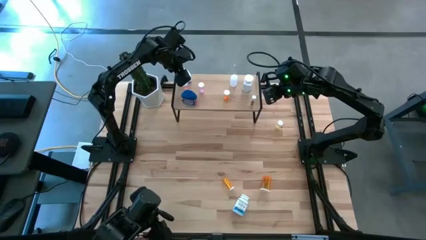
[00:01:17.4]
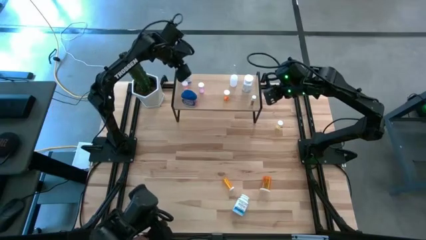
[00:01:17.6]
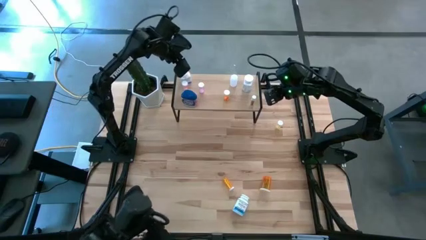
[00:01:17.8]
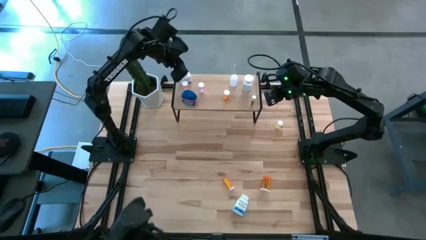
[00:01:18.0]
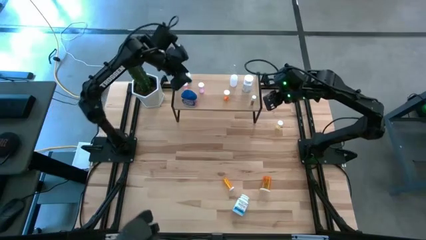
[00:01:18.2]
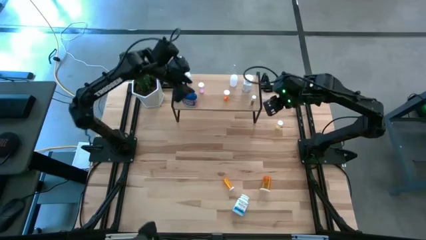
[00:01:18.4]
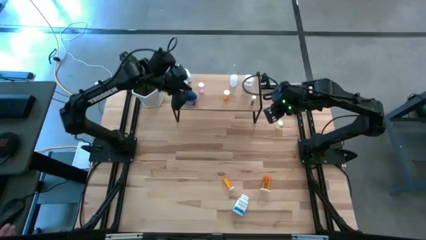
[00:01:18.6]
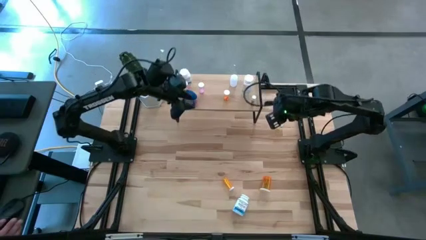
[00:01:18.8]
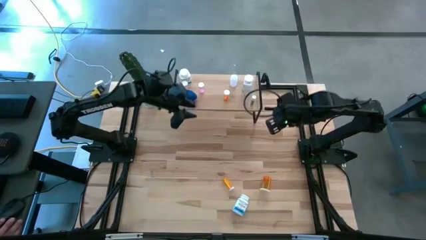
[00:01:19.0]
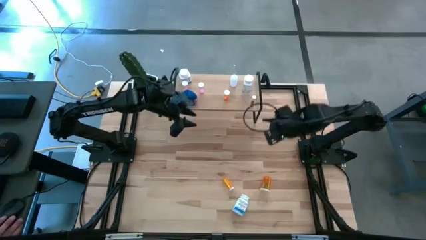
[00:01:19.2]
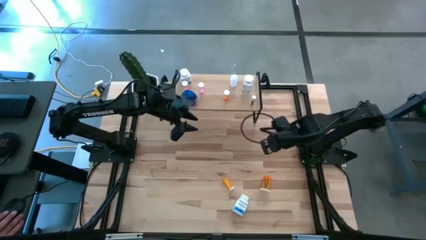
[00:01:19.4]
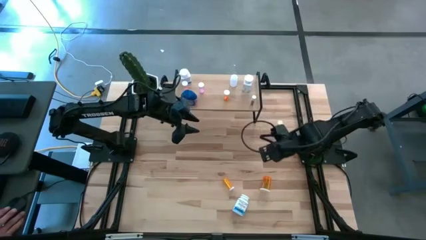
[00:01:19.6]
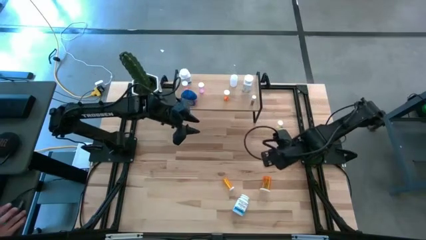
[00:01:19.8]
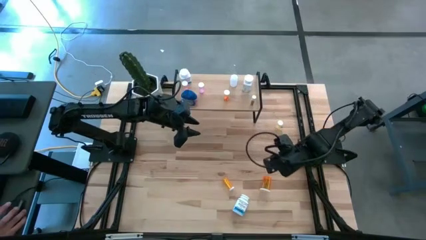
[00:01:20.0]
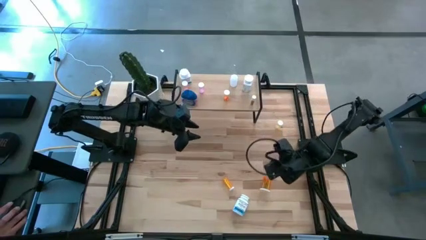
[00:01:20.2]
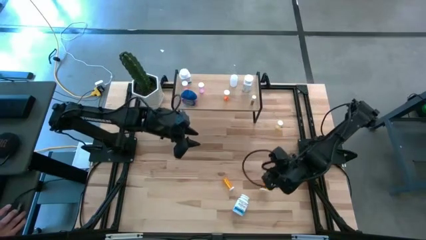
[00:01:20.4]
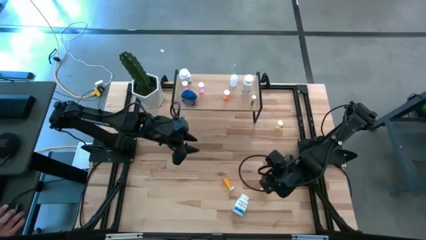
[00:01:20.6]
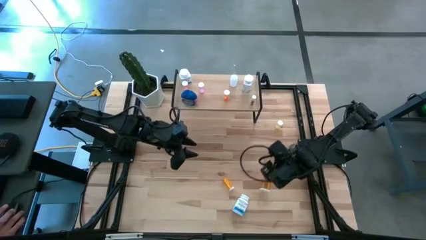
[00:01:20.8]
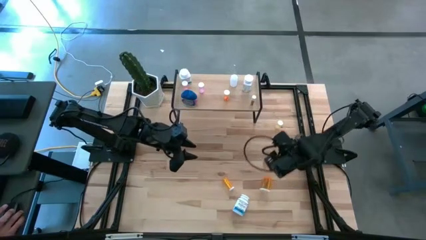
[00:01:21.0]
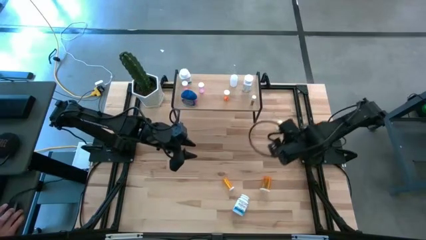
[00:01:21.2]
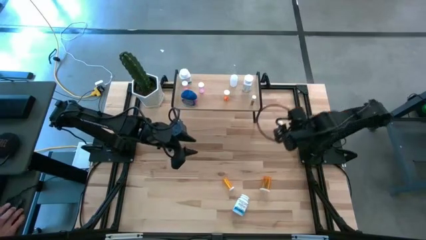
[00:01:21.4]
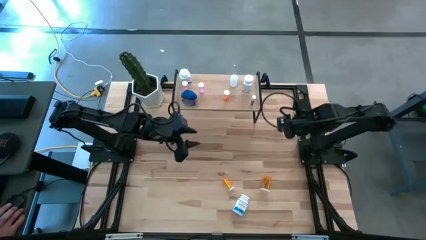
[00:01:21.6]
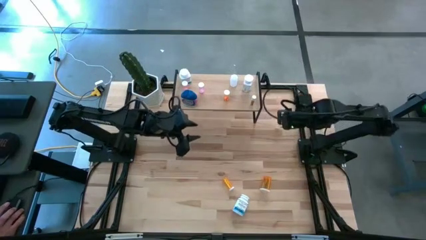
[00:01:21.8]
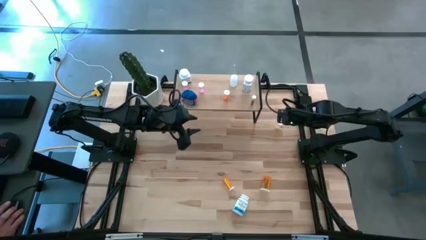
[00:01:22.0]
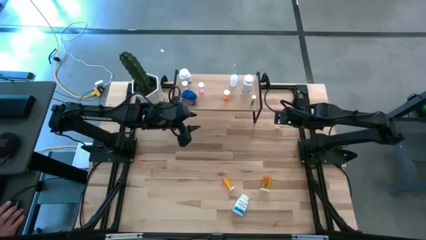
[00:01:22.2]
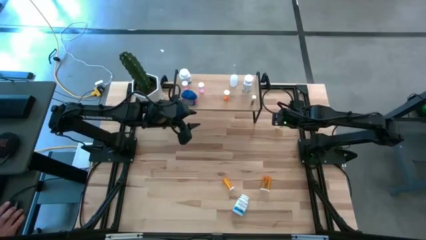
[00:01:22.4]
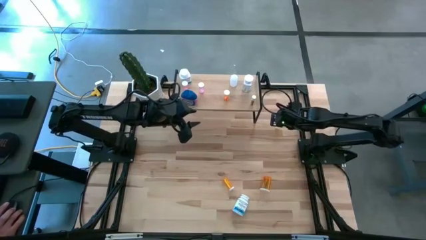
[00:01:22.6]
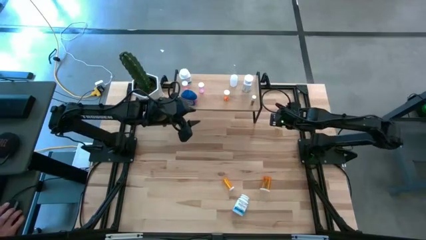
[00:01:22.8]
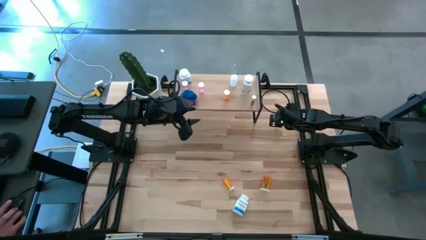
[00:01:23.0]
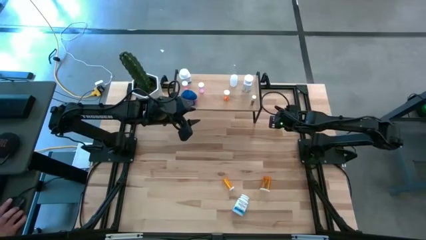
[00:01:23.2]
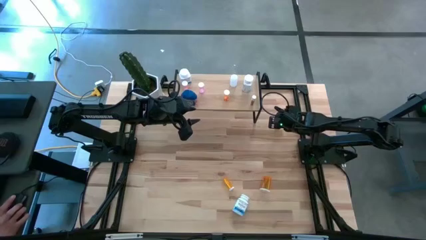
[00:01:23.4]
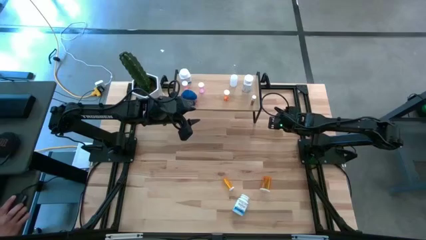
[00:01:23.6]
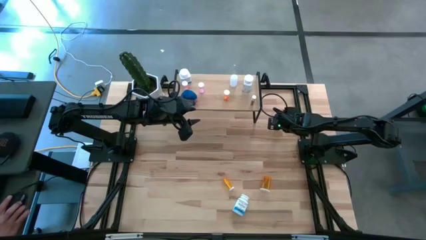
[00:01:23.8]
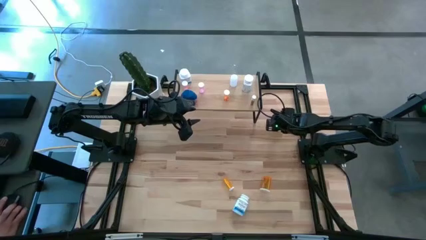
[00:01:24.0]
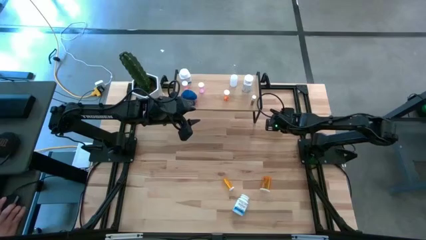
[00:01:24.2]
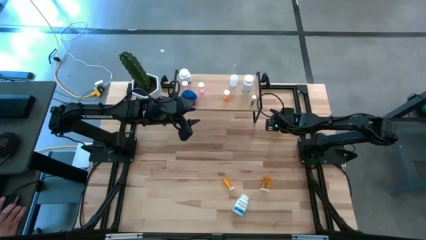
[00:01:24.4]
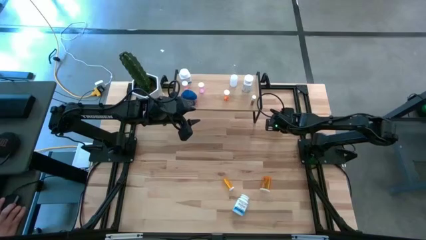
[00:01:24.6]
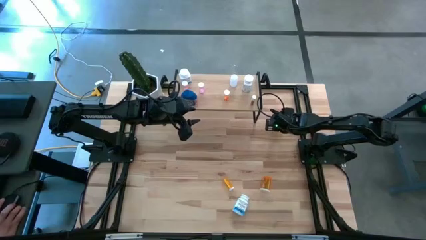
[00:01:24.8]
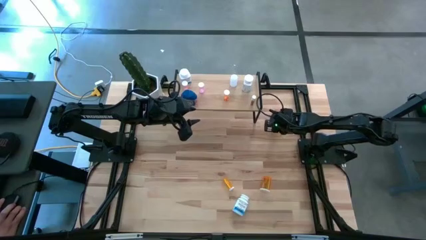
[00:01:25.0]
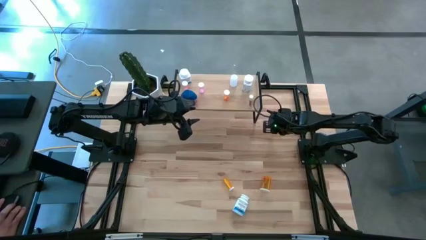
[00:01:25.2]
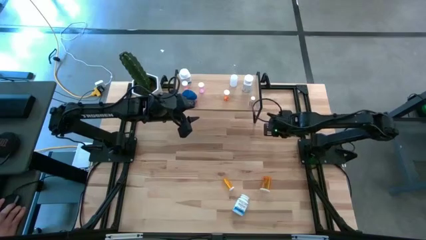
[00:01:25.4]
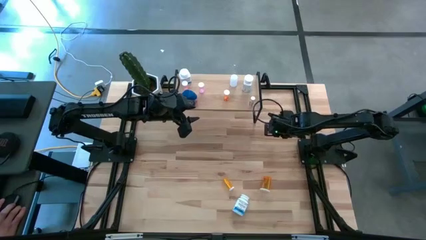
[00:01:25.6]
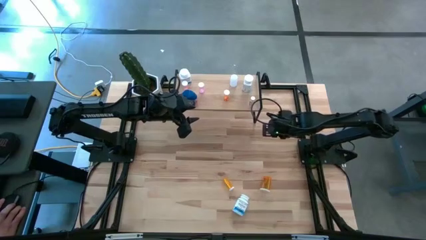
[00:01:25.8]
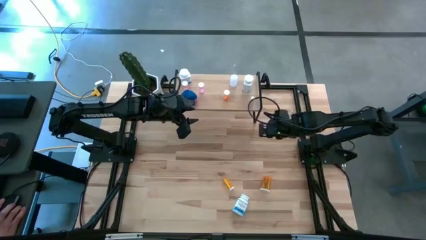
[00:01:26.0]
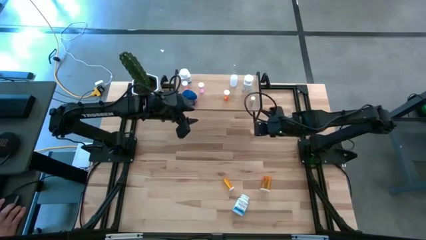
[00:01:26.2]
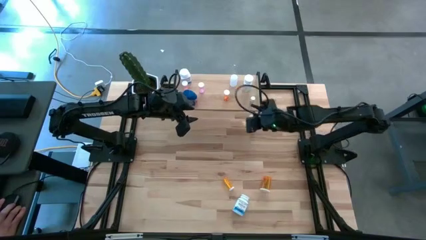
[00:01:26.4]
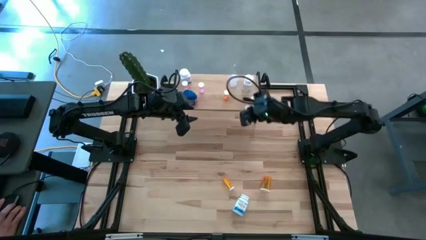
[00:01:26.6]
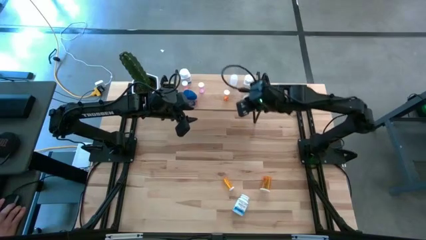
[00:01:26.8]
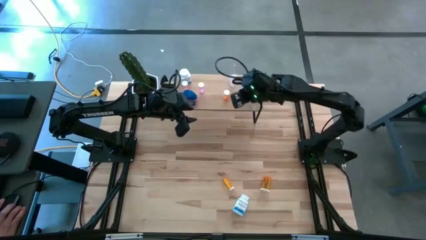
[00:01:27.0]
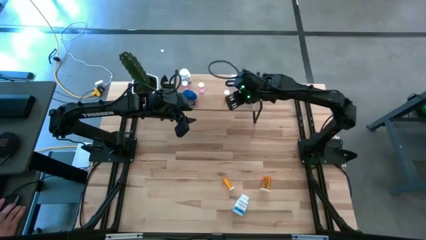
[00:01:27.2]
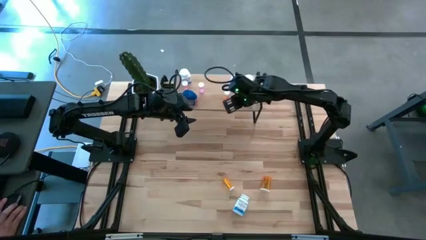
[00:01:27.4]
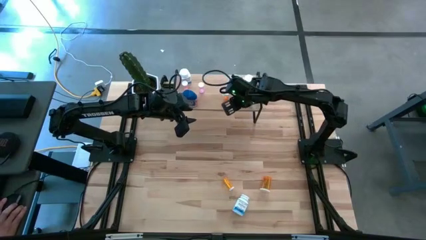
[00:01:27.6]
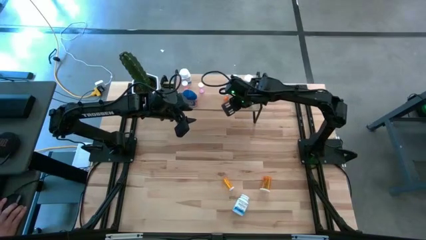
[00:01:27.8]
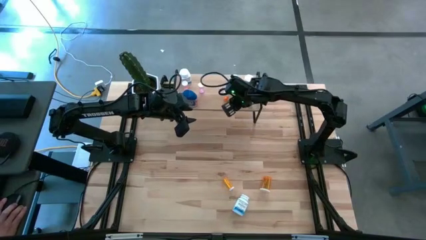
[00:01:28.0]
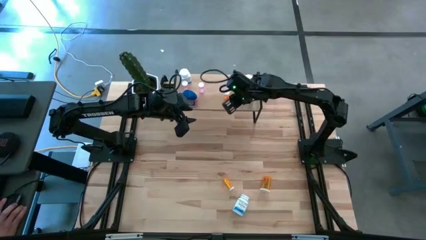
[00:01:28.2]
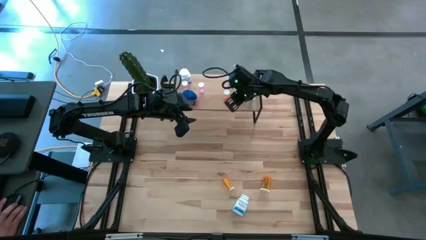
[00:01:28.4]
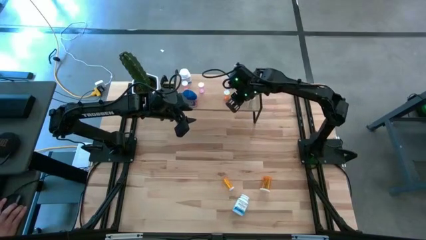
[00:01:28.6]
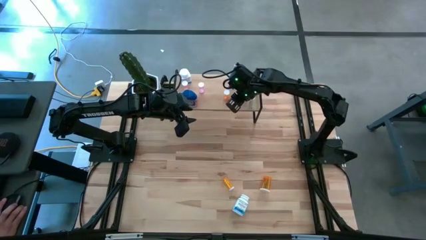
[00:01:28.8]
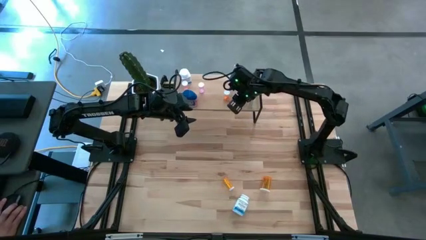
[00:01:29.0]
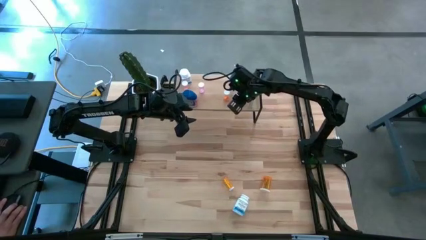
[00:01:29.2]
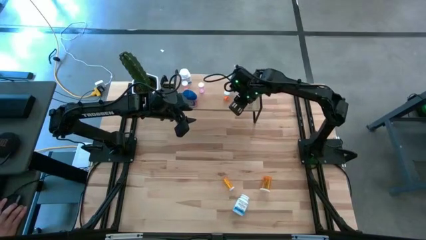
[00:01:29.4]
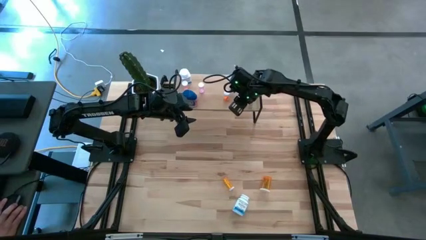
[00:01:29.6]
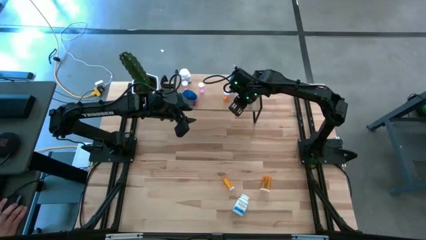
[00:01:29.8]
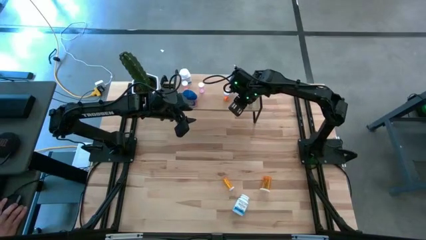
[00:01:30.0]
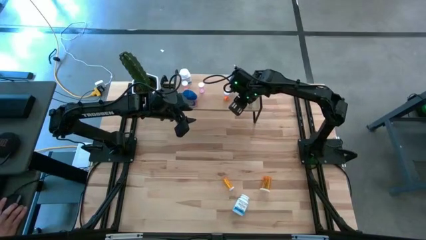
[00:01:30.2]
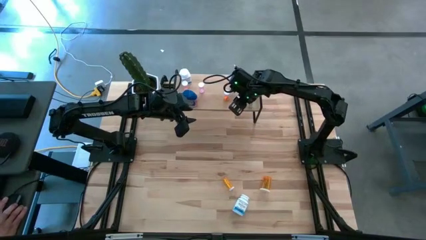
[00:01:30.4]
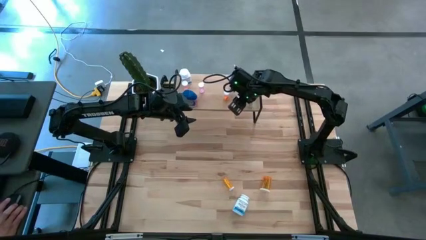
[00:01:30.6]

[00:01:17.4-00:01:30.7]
Task: Pick and place medicine bottles onto shelf by color
Put the yellow small pill bottle on the shelf

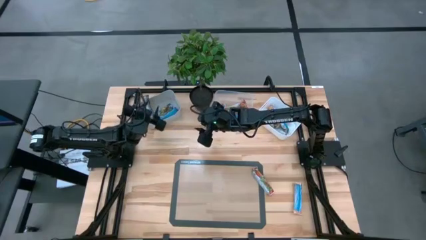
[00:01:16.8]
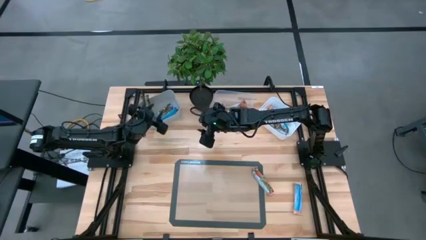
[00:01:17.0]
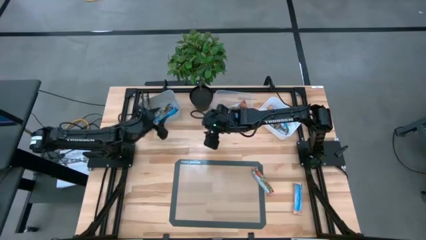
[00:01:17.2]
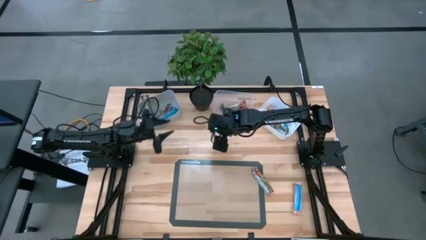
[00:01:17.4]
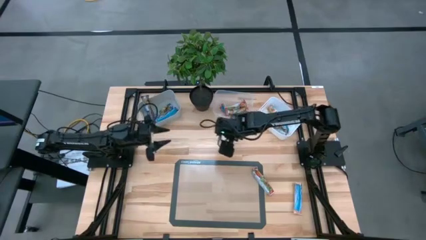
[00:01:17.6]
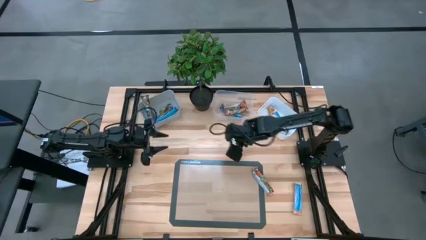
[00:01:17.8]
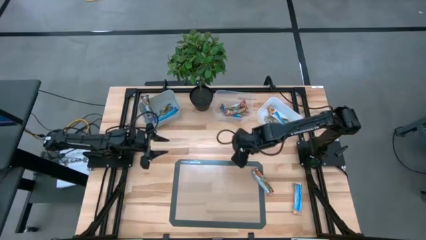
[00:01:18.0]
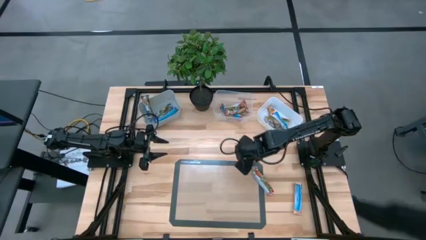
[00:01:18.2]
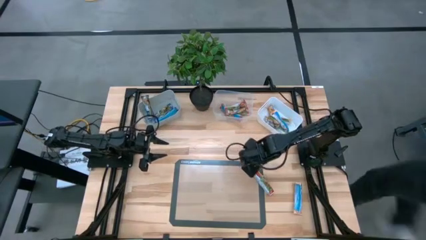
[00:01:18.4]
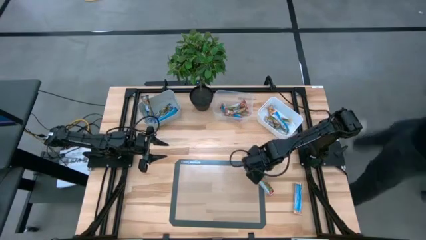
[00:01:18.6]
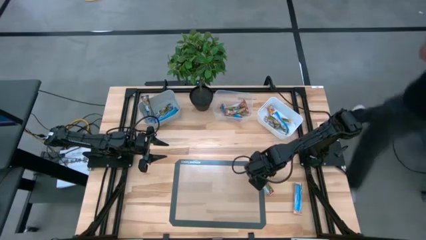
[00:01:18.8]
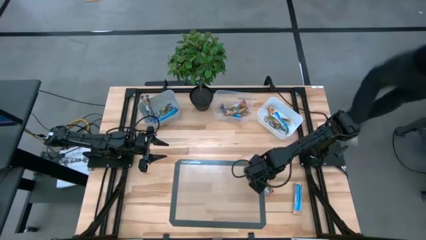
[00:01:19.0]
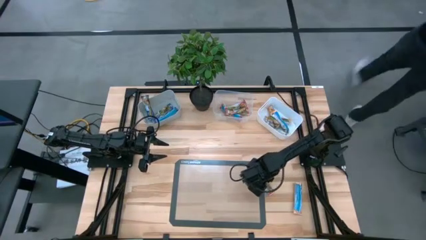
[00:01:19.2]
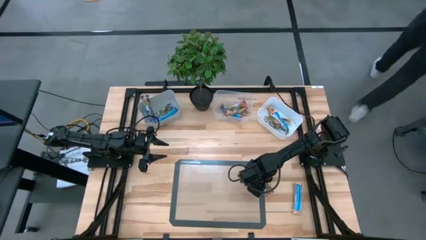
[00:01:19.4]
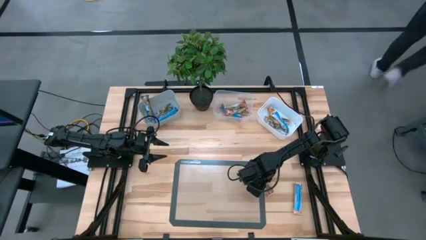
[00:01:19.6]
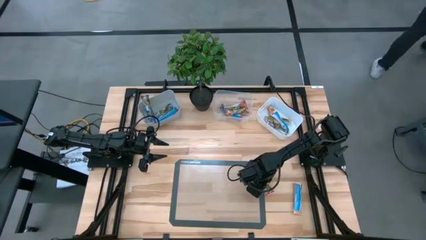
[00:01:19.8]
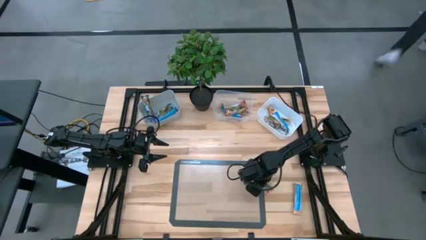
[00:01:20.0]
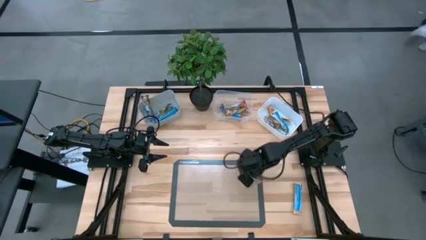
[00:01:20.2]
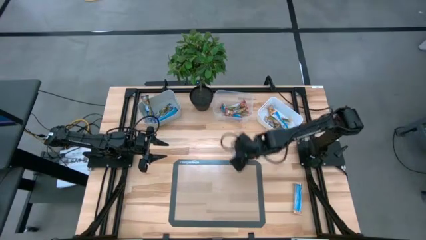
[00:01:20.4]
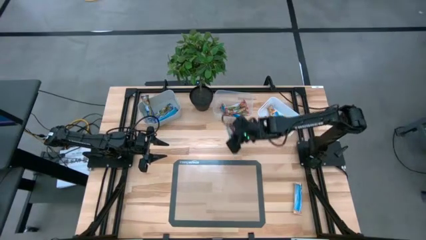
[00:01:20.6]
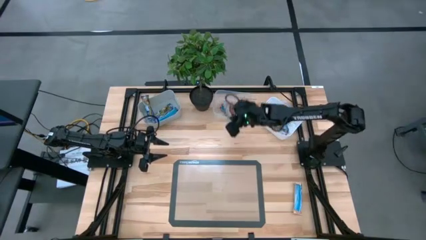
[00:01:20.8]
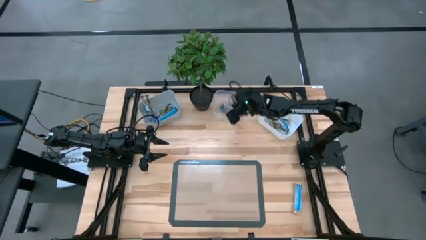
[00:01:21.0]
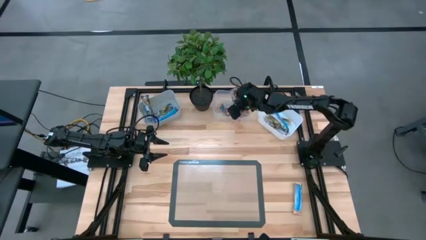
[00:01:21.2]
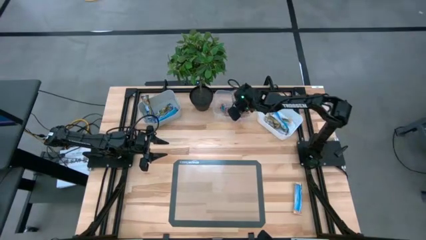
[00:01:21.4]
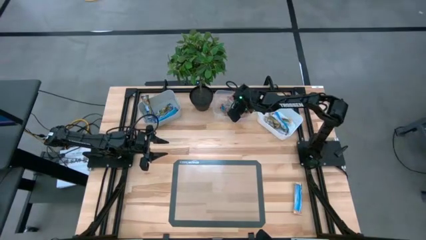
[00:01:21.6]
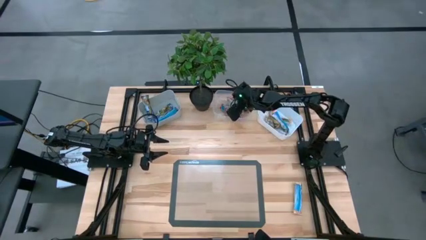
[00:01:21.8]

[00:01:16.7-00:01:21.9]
Task: Pick and place Granola Bars by type
Put the red granola bar into the transparent bin
